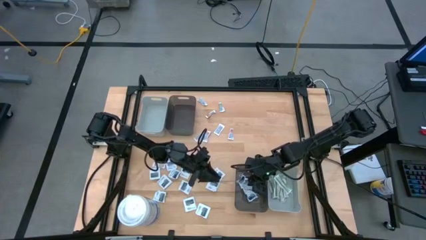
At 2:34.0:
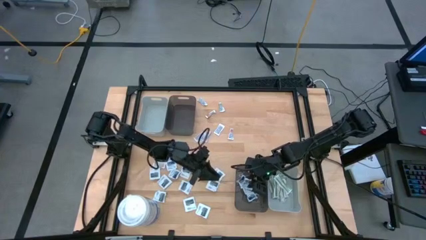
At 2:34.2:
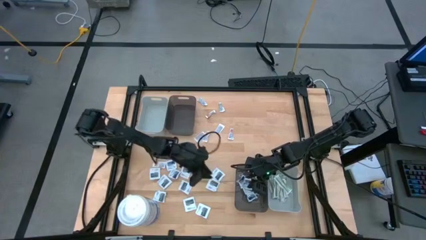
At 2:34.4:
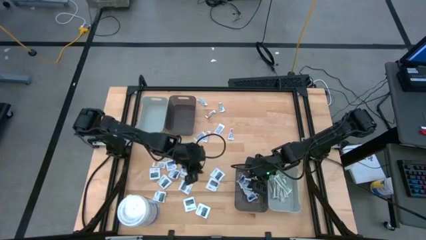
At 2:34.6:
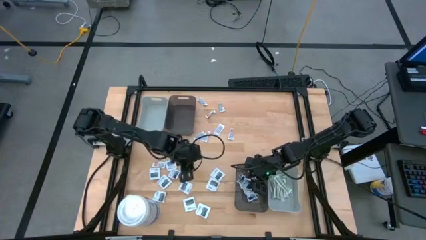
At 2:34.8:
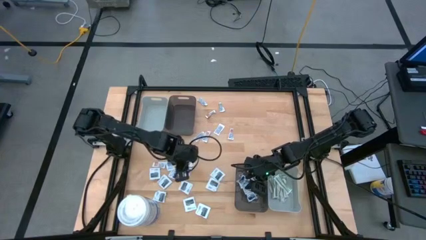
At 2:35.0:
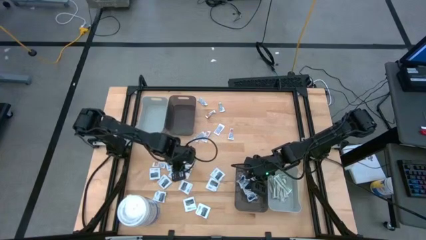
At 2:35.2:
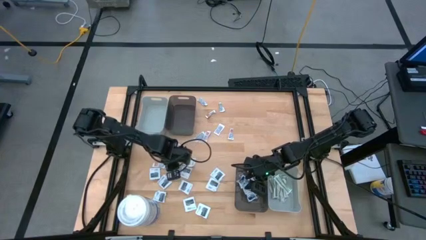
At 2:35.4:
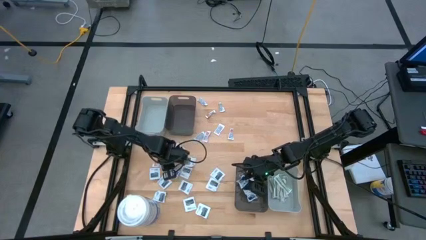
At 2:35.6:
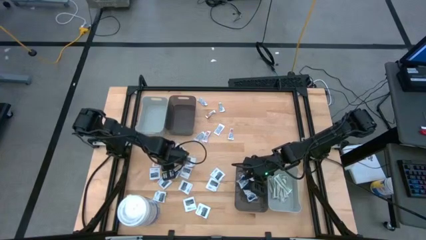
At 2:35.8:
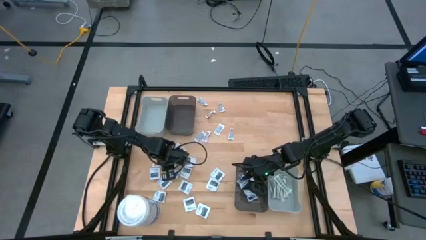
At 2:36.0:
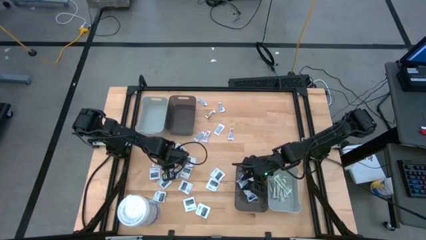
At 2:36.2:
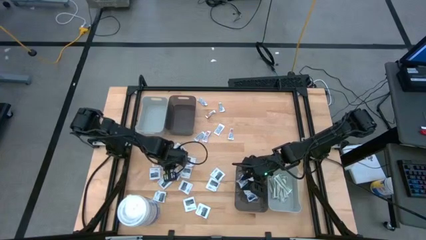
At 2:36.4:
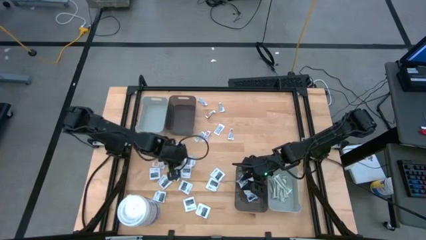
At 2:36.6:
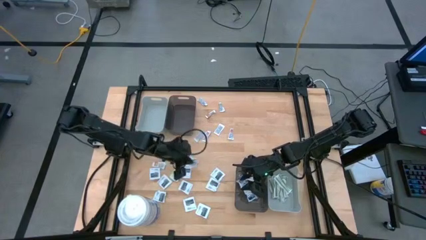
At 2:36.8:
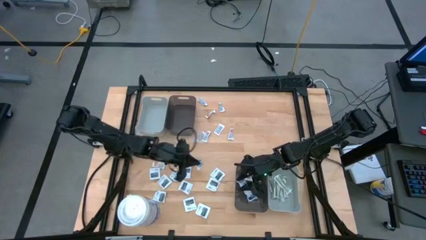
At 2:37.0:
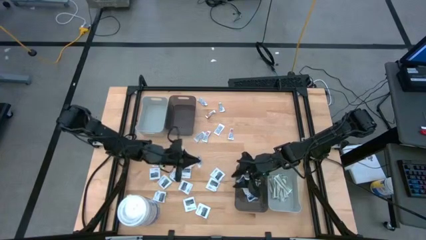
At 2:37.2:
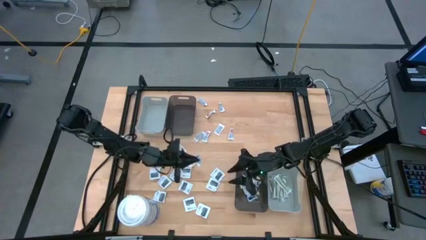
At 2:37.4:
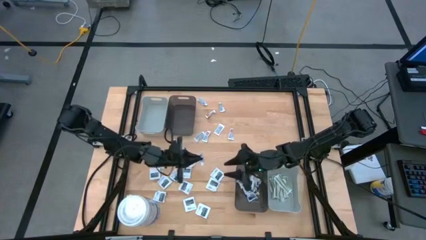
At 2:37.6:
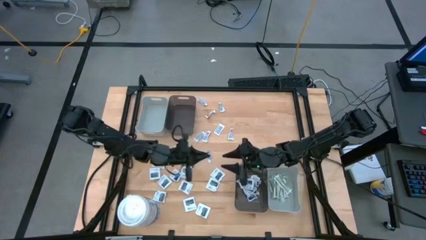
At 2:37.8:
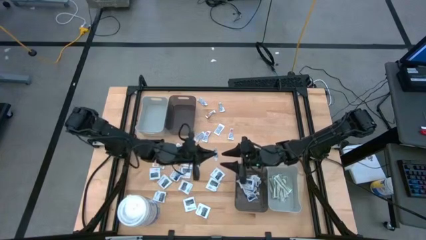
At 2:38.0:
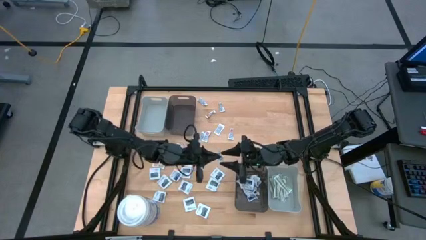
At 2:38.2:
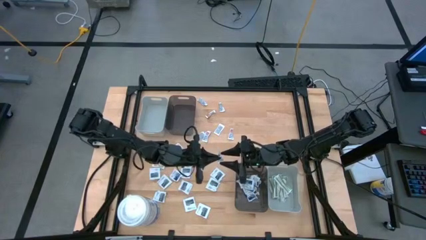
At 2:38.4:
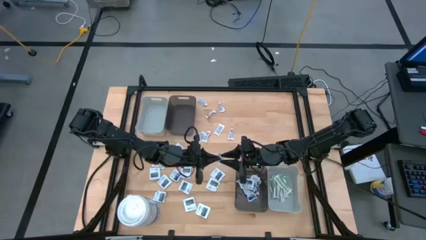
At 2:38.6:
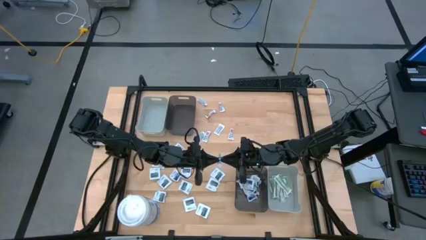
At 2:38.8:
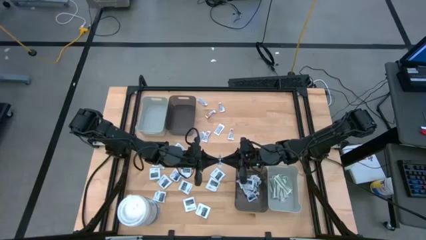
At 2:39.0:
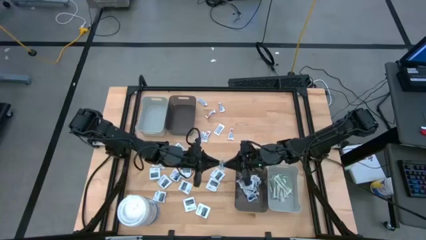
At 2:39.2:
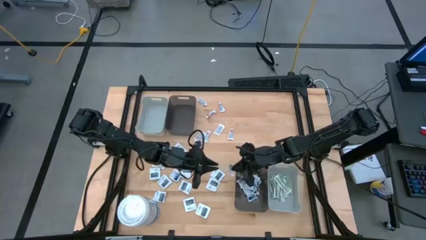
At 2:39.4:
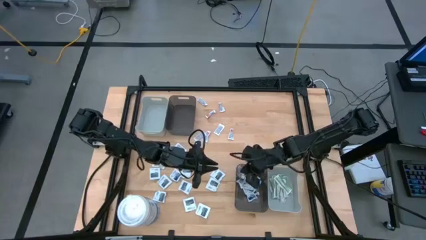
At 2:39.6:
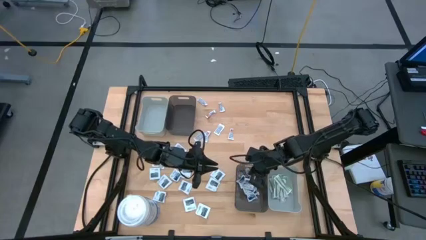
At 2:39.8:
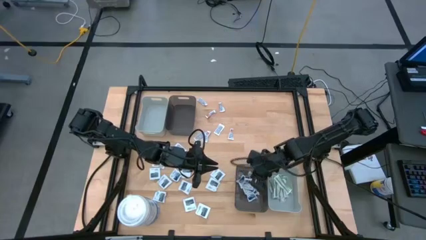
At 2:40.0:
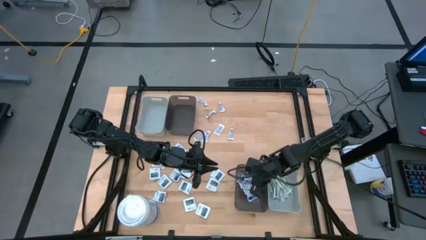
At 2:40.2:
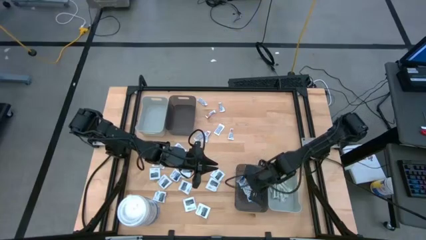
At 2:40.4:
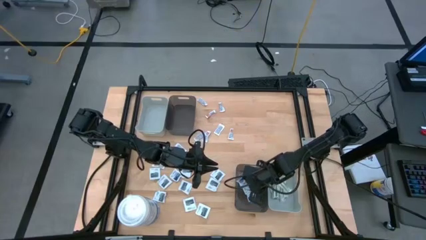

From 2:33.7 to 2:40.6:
Task: Pick & Place First Aid Supplies
Put the white alcohol pad into the bottom black bin

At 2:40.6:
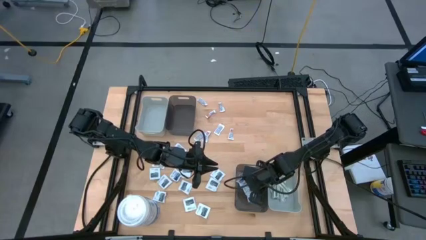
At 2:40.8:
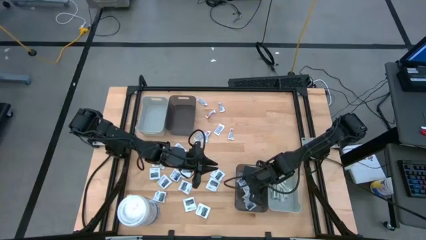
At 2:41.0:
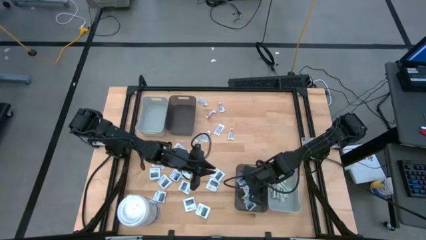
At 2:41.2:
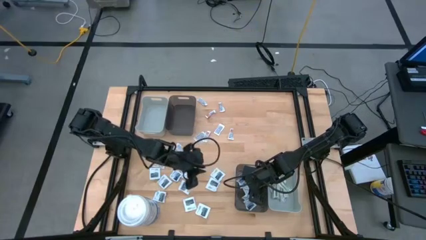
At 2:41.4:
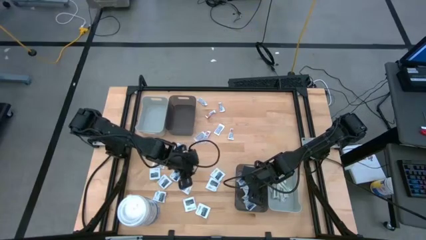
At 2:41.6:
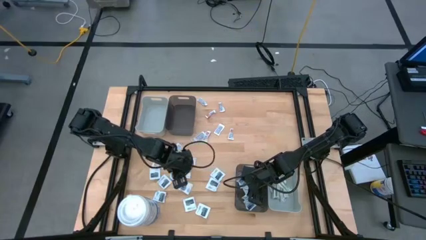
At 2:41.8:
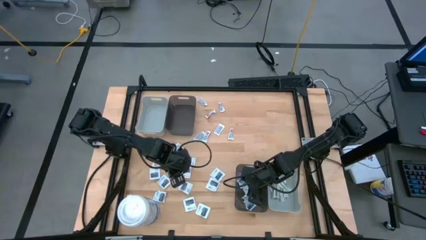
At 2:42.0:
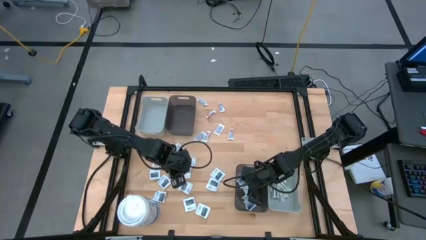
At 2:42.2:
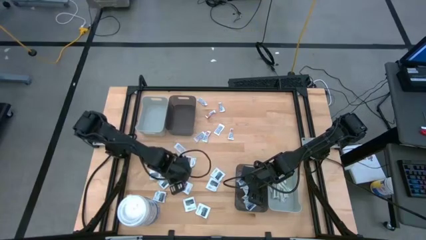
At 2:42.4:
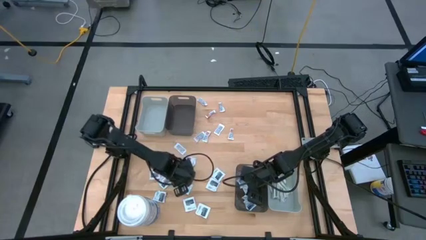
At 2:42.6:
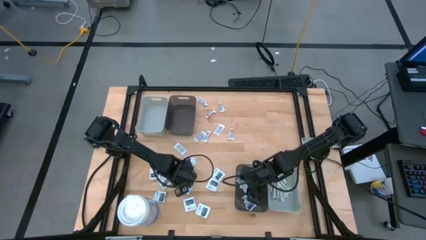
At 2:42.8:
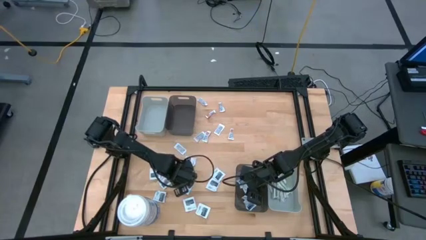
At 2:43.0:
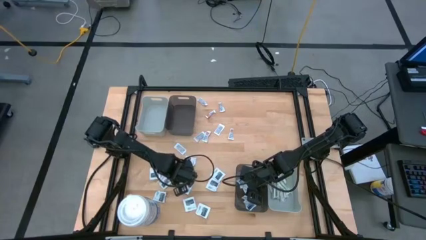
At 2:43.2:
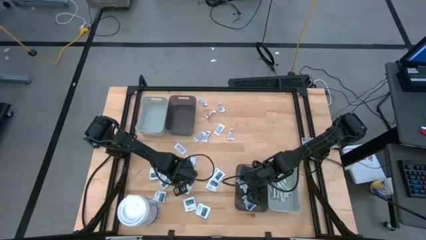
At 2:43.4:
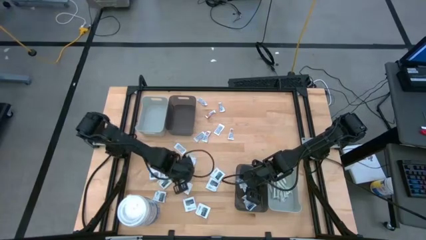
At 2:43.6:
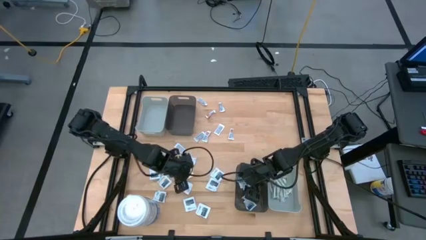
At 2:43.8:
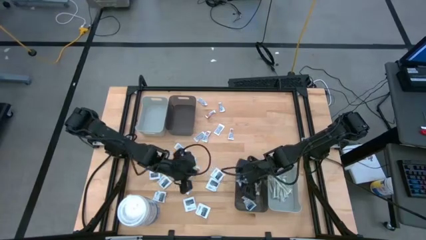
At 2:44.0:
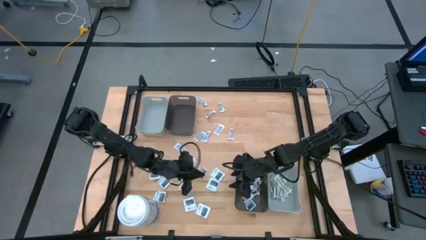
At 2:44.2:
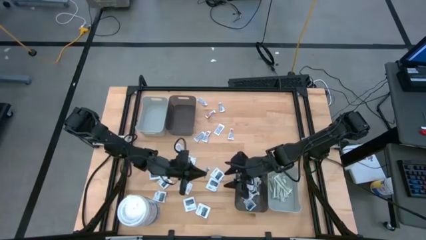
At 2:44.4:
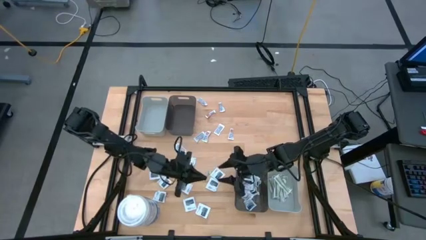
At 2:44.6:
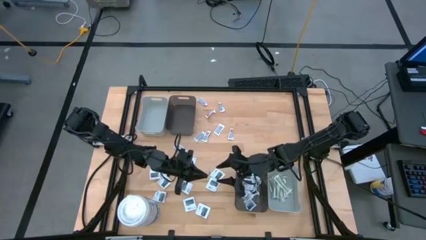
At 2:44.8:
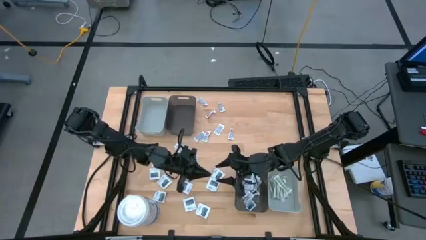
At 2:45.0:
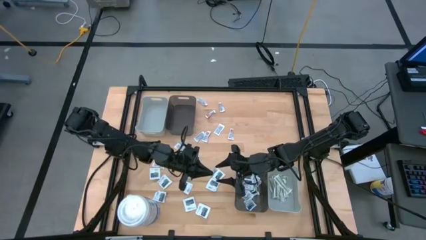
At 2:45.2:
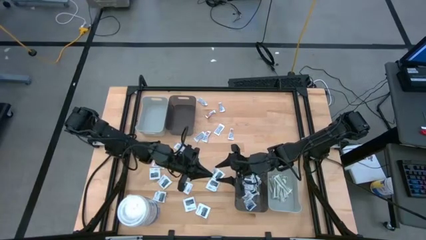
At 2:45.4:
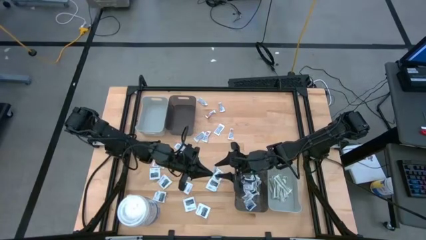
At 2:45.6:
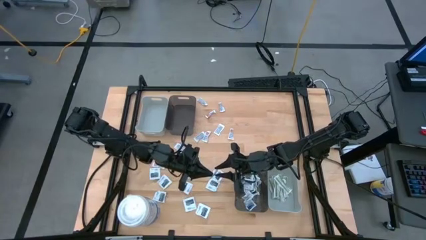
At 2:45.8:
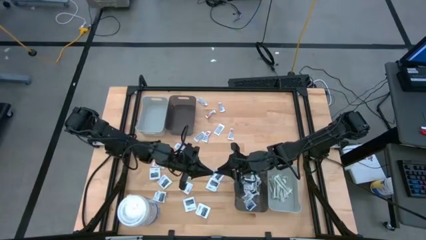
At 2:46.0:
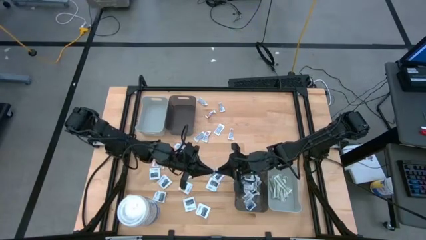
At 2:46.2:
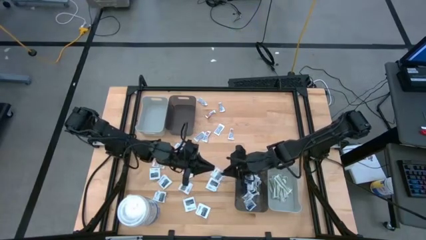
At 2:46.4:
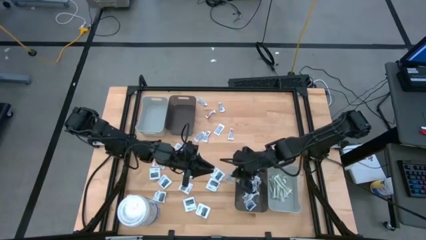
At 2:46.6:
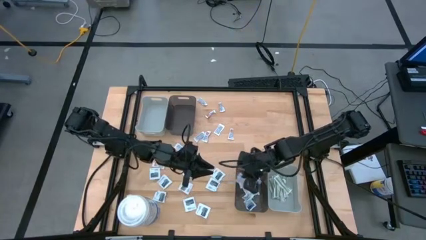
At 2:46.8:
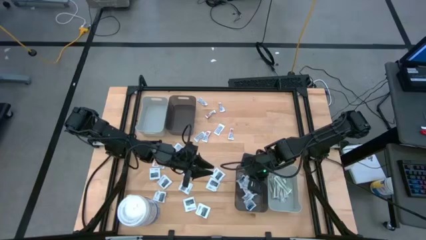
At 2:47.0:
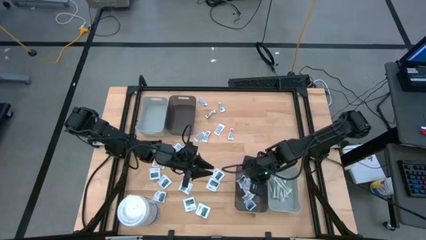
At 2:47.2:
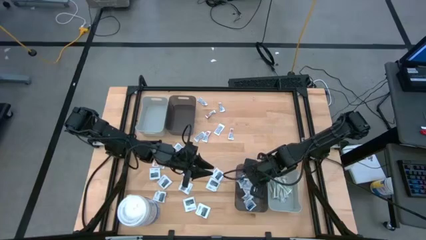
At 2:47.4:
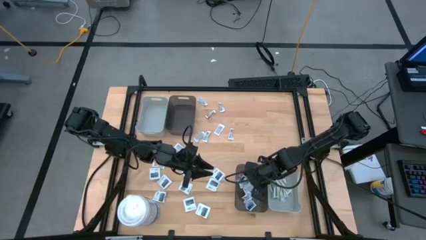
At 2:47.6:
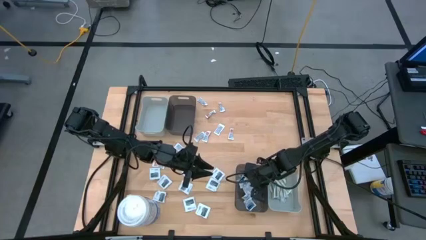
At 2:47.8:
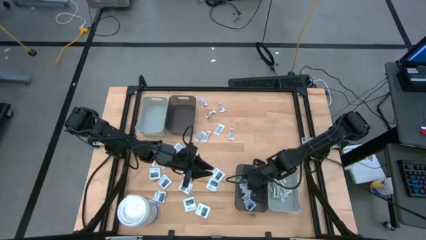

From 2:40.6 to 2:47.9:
Put the white alcohol pad into the bottom black bin
